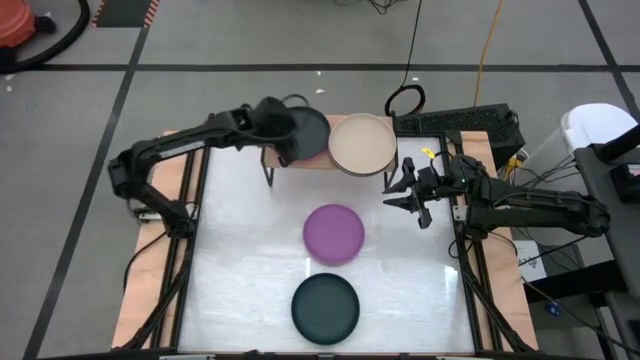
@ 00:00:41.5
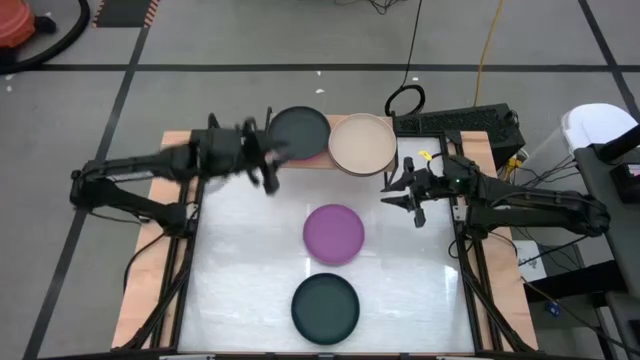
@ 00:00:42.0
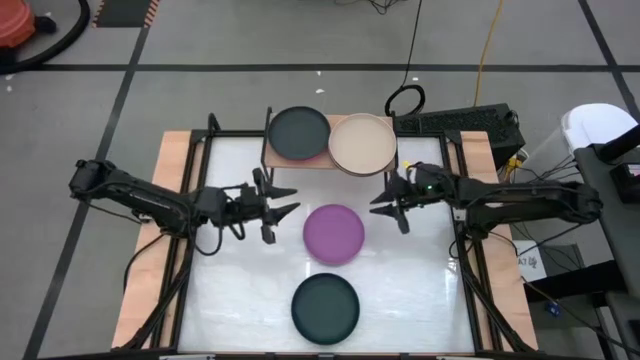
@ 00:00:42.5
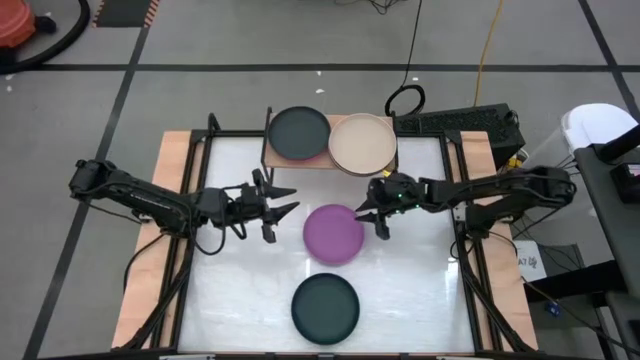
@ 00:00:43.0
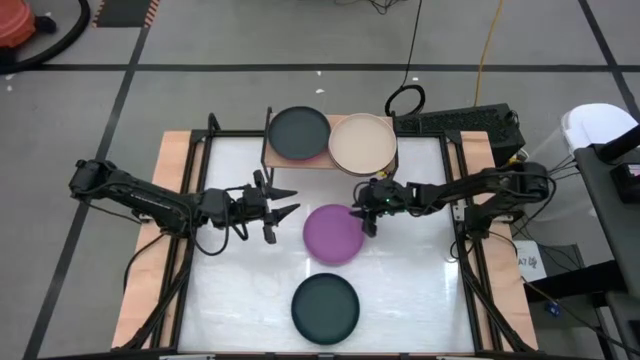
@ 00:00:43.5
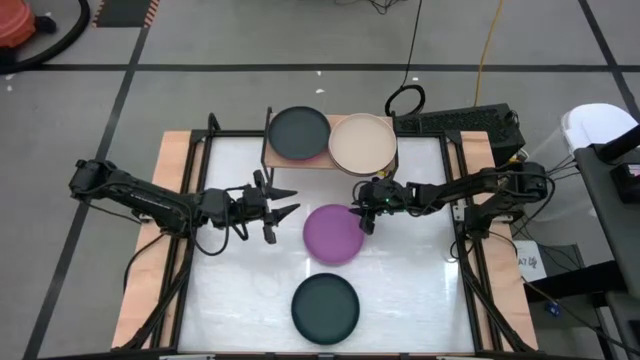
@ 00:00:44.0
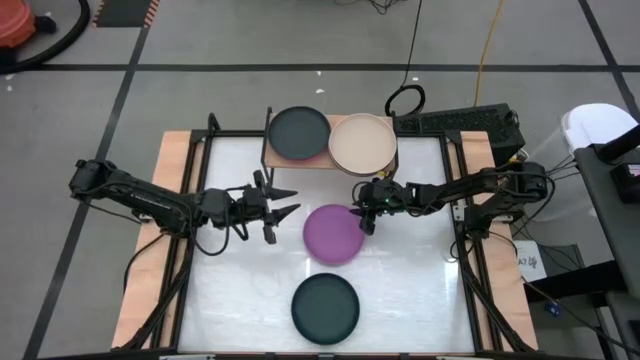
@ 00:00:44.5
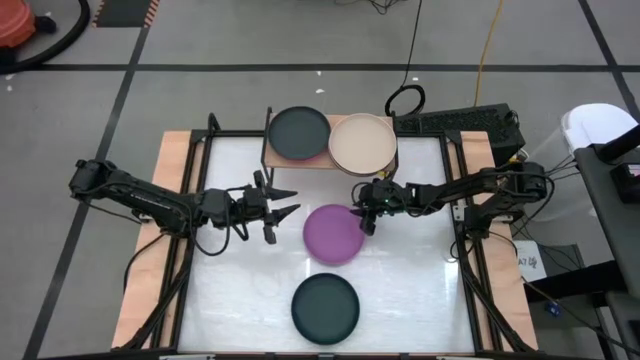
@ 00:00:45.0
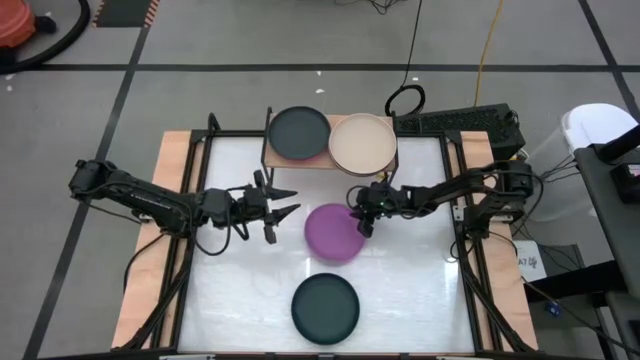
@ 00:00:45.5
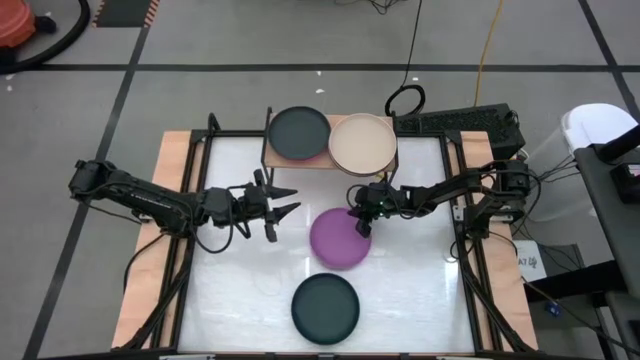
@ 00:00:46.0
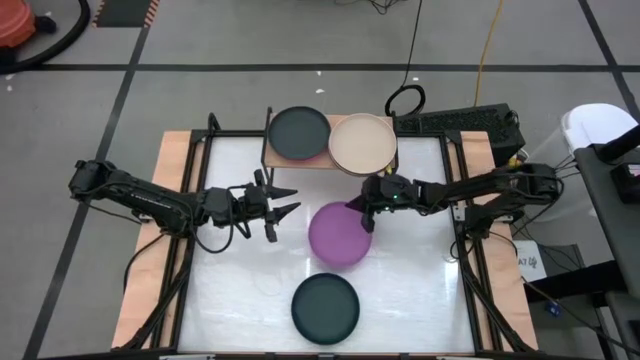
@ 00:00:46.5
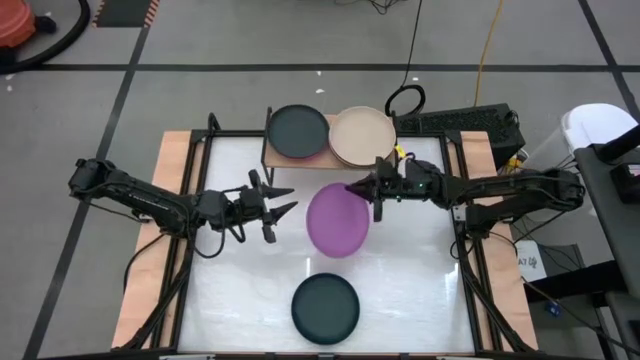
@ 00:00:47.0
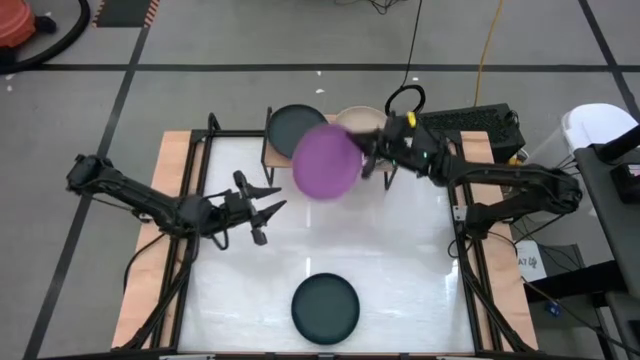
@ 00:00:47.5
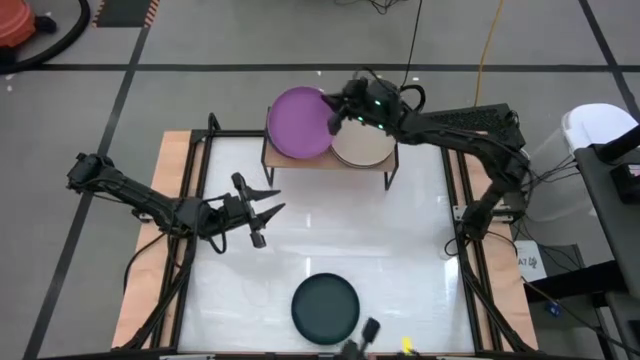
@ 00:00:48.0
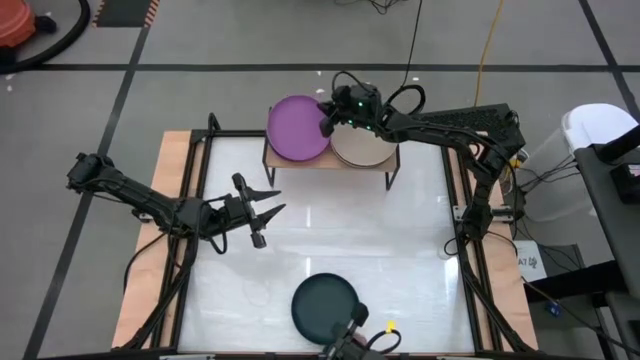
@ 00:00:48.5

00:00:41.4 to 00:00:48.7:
Task: Place and stack plates onto a shelf
Stack the purple plate on top of the black plate on the shelf

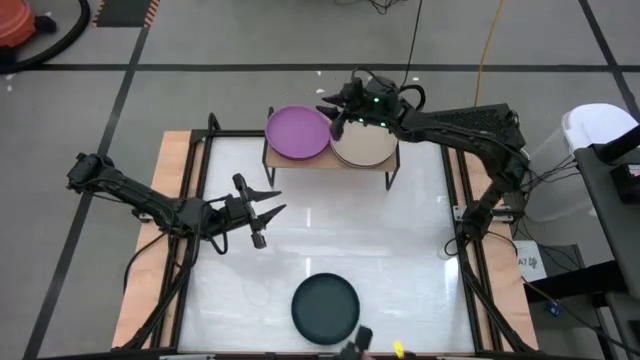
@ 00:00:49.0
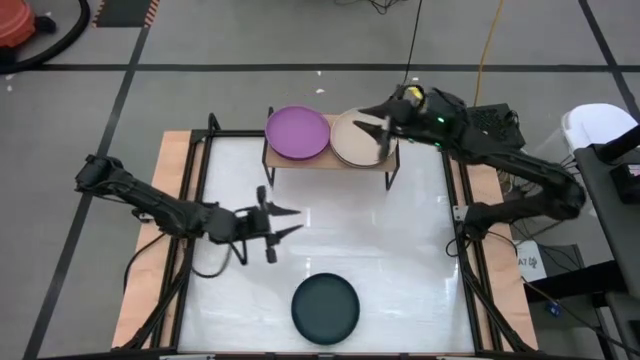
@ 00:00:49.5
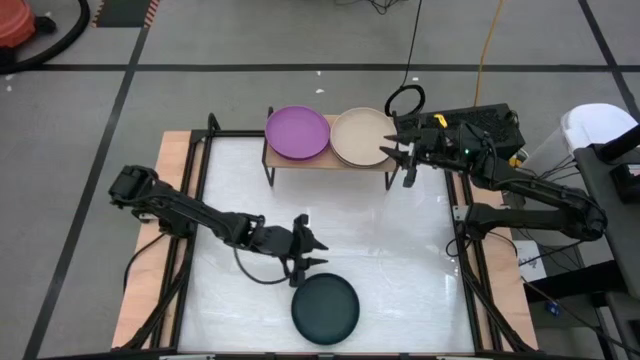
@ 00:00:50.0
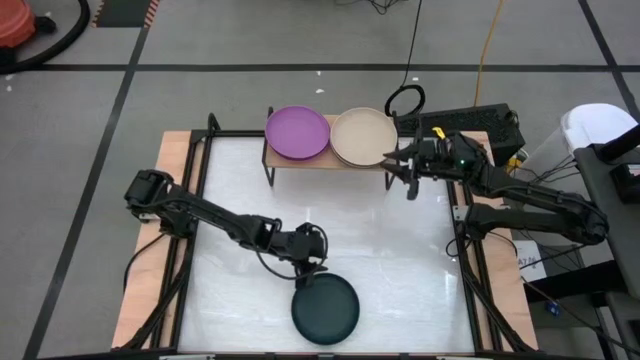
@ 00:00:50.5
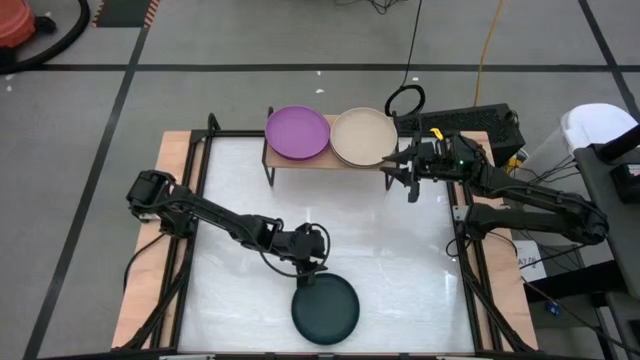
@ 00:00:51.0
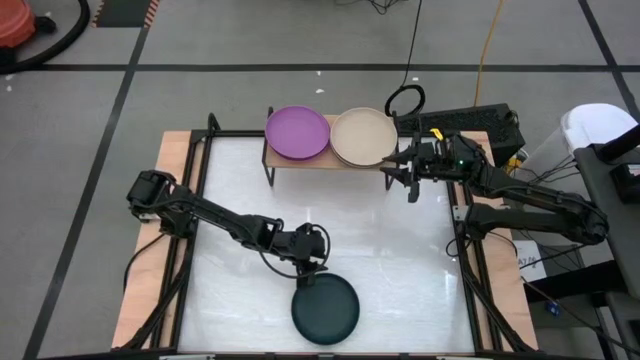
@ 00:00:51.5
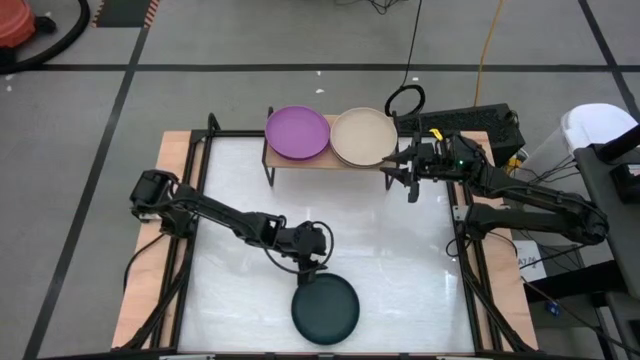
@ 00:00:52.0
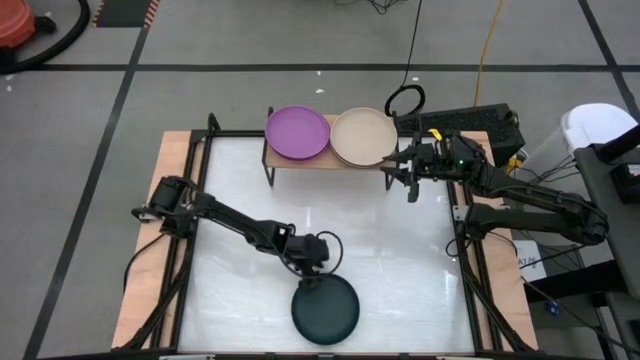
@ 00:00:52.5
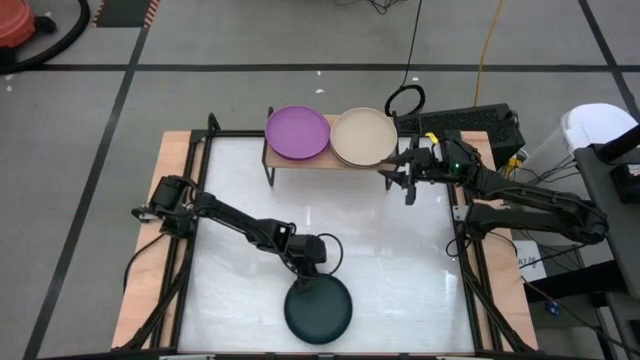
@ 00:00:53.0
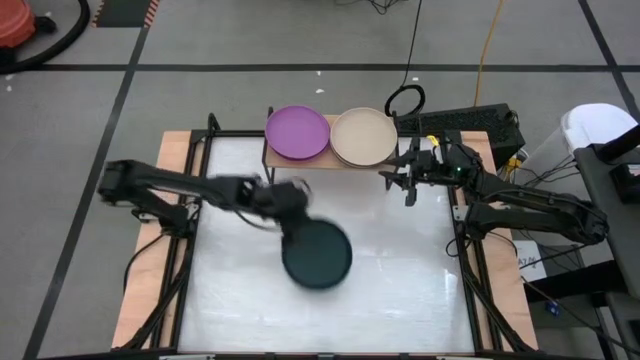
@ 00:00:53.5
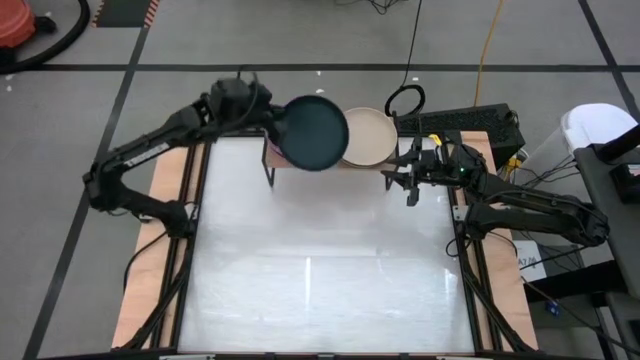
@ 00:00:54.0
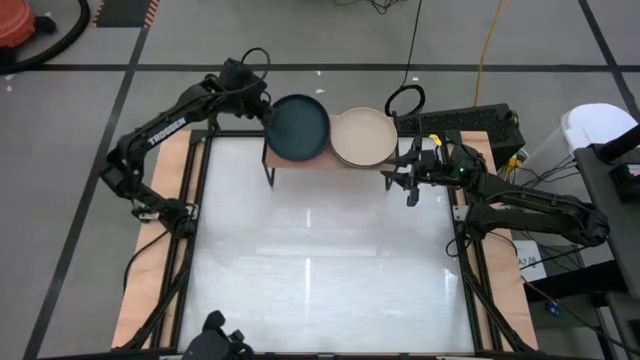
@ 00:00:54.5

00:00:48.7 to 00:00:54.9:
Stack the dark green plate on top of the purple plate on the shelf

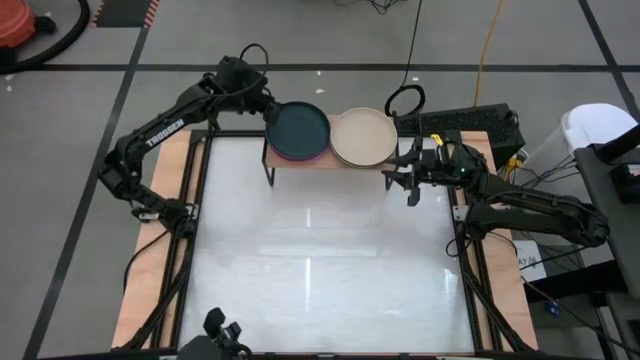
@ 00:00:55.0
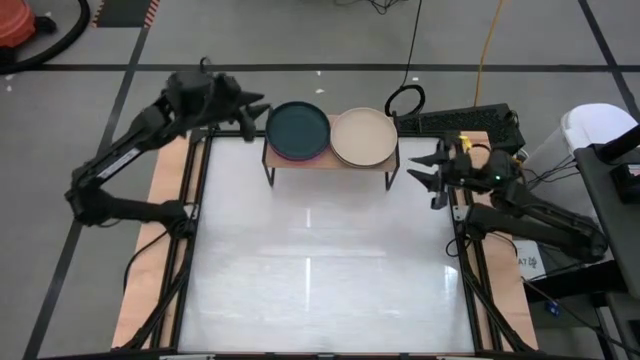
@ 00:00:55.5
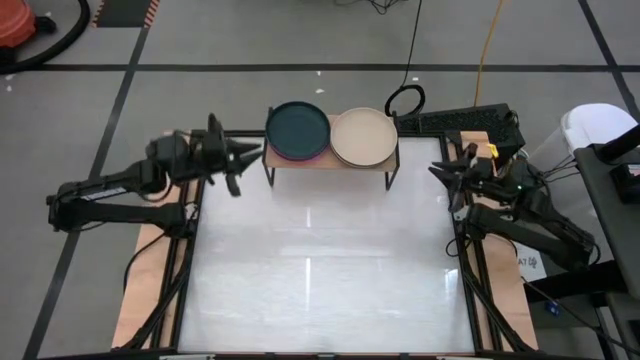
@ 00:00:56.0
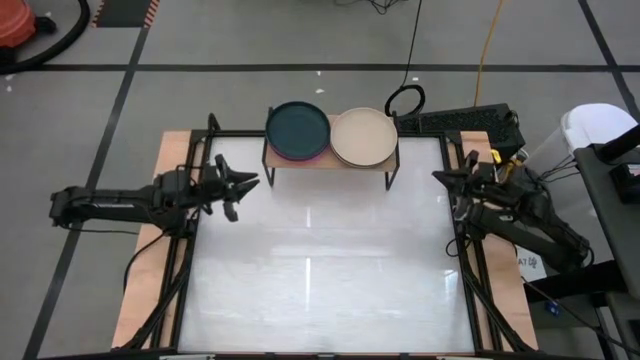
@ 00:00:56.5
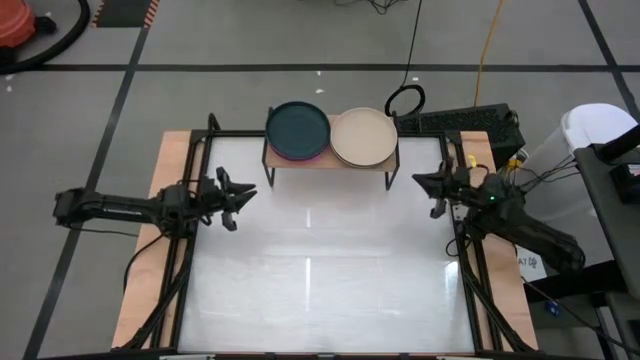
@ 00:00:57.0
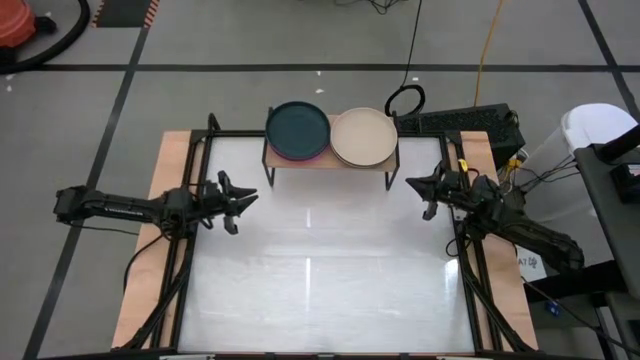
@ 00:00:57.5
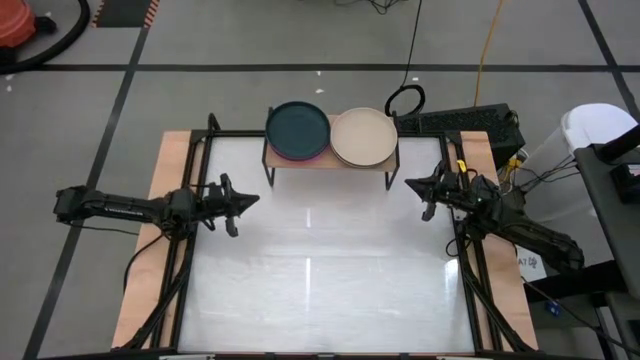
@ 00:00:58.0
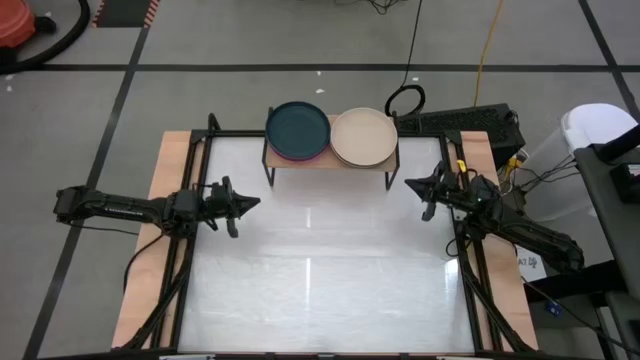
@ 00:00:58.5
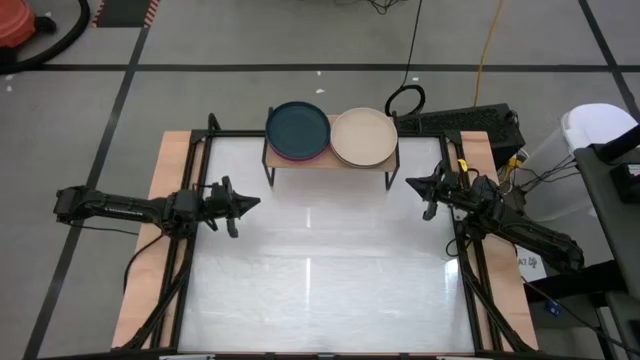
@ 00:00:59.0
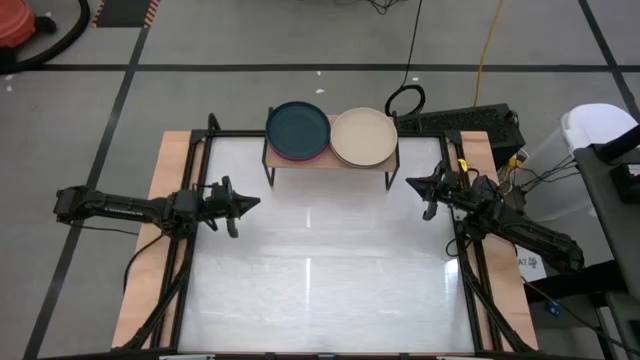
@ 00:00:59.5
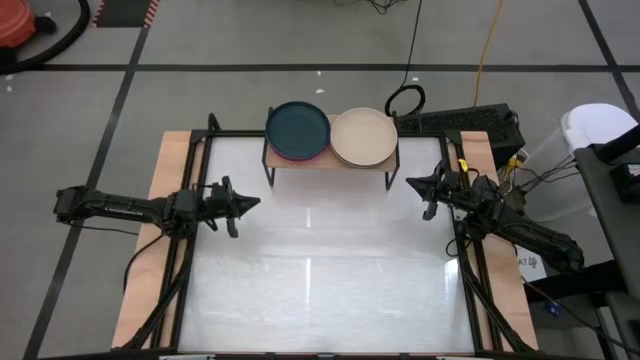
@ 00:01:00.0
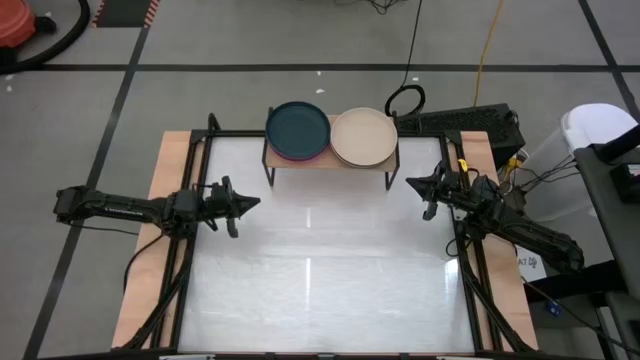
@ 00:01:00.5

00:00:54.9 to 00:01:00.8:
Return to Home Position
